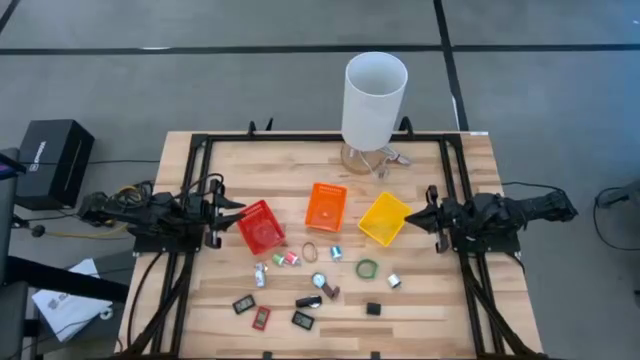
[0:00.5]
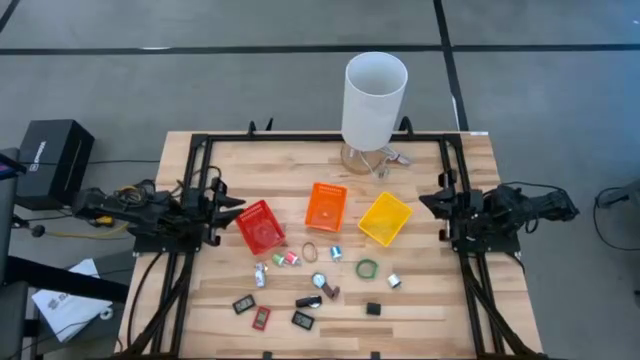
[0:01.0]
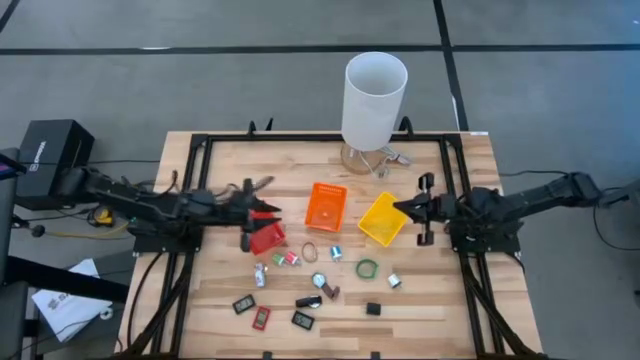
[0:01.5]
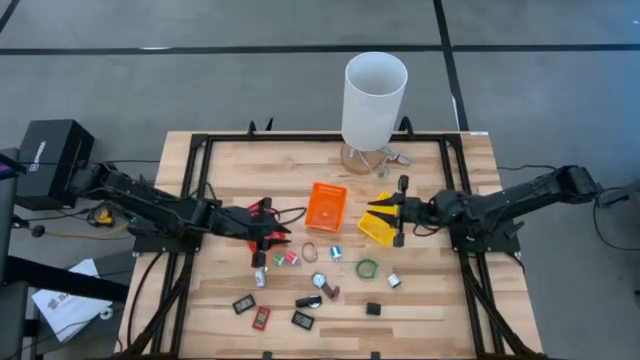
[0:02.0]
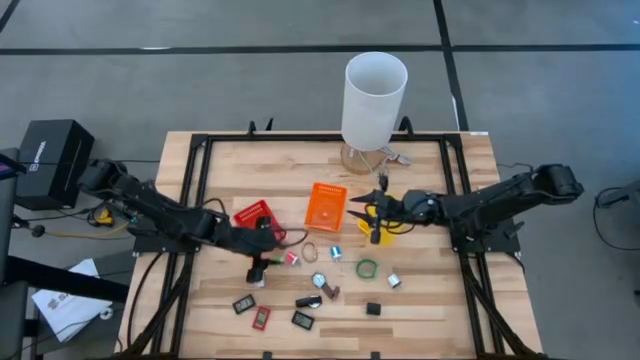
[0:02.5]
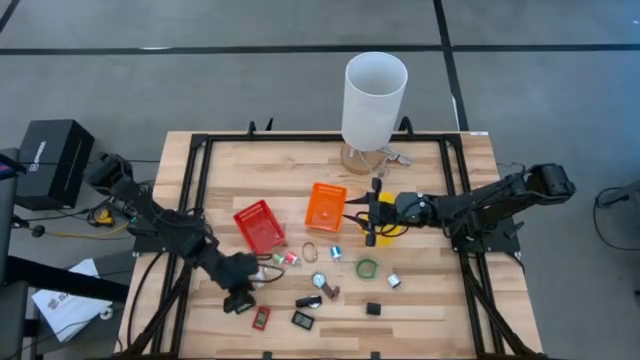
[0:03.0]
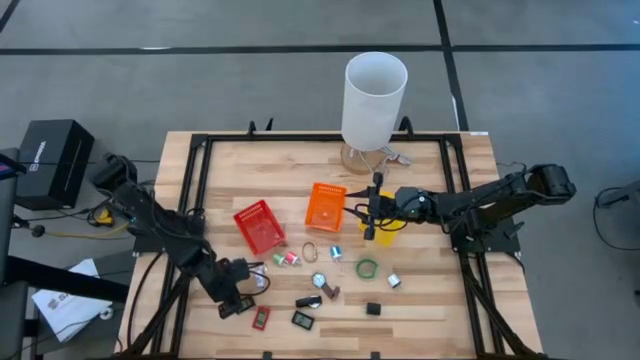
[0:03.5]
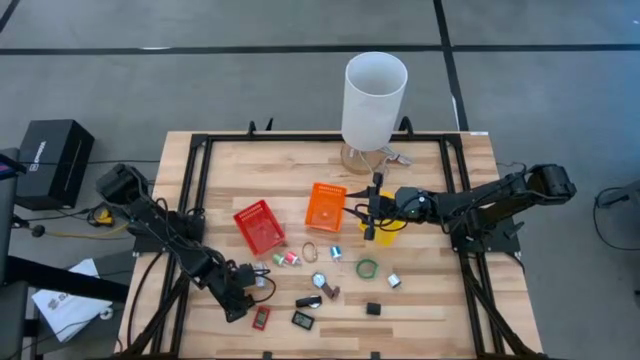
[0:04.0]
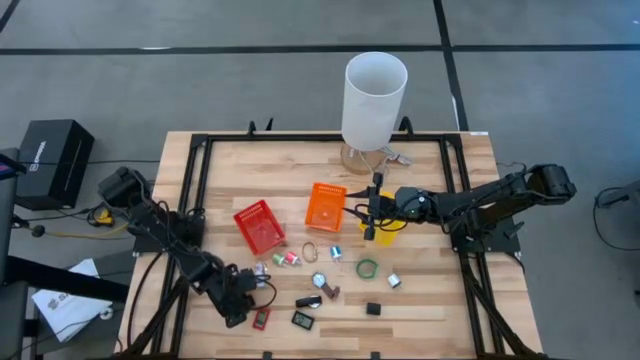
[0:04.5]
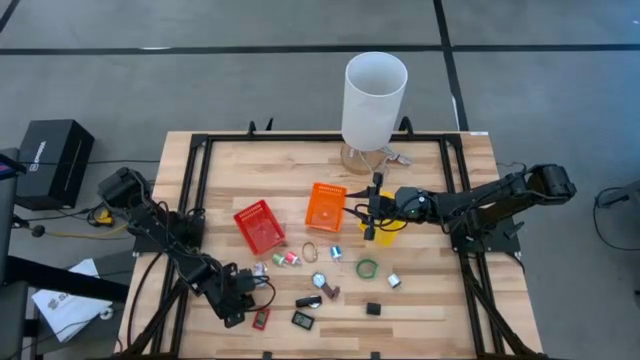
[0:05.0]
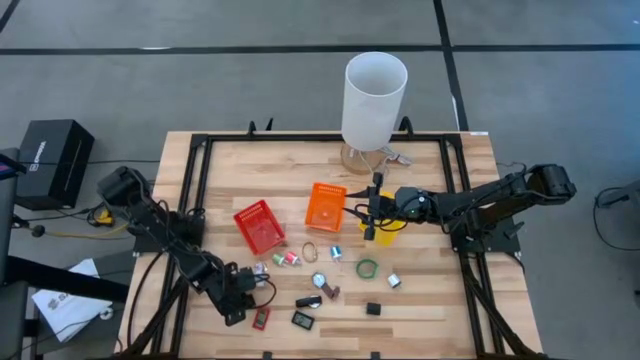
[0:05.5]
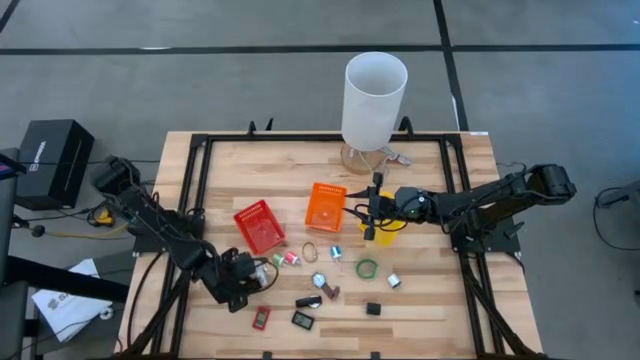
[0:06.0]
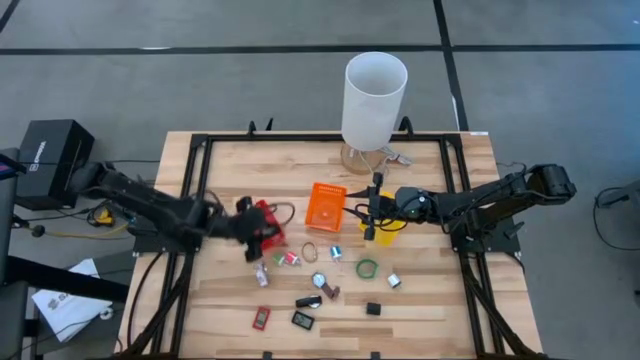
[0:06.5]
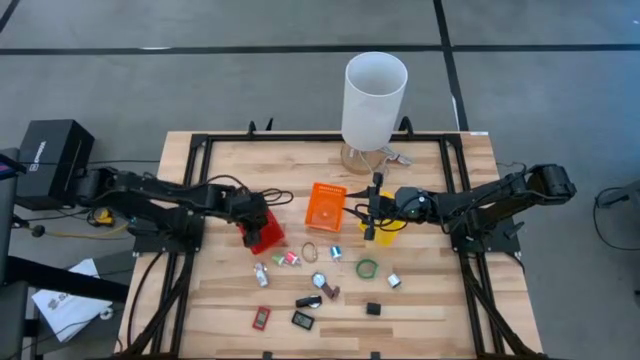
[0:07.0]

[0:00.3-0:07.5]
Task: Pick & Place Office items
Put the left black digital clock into the red bin

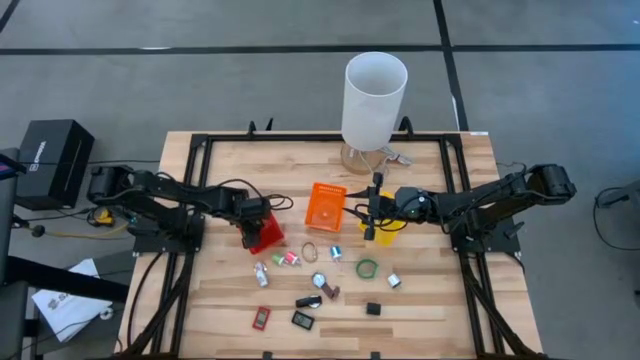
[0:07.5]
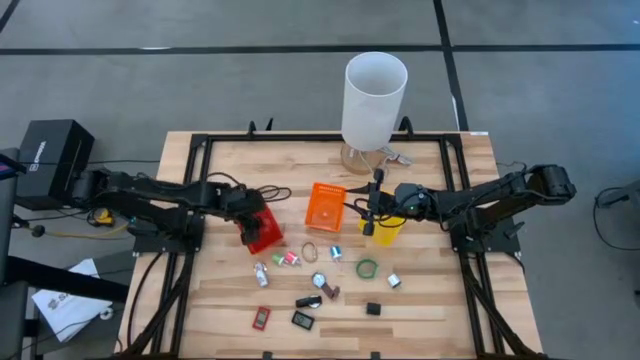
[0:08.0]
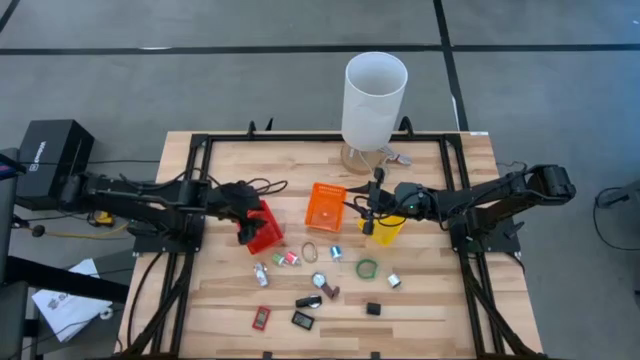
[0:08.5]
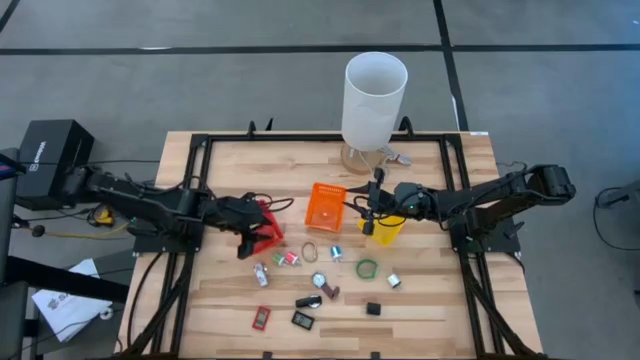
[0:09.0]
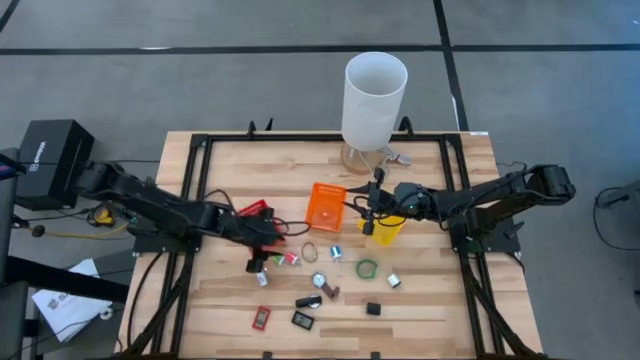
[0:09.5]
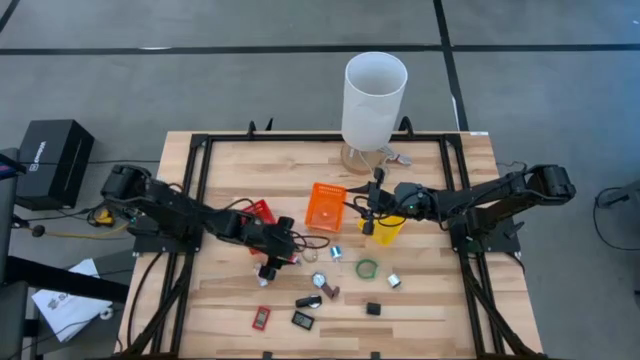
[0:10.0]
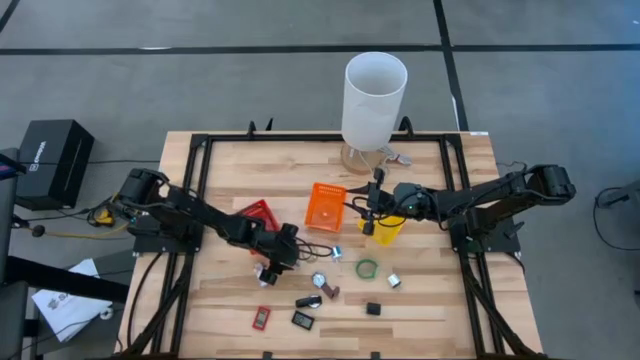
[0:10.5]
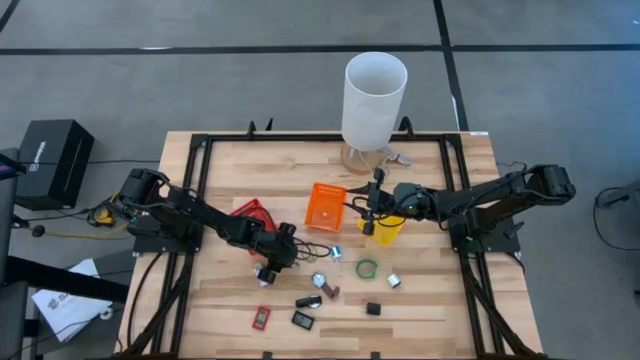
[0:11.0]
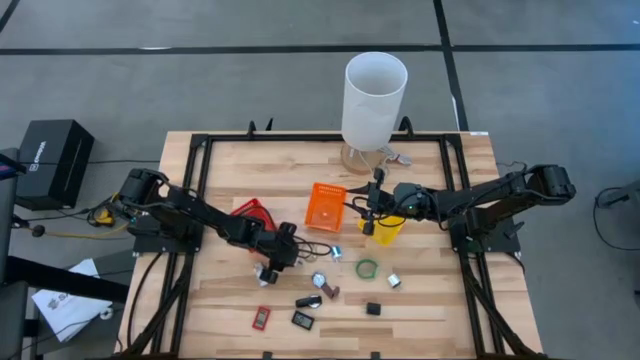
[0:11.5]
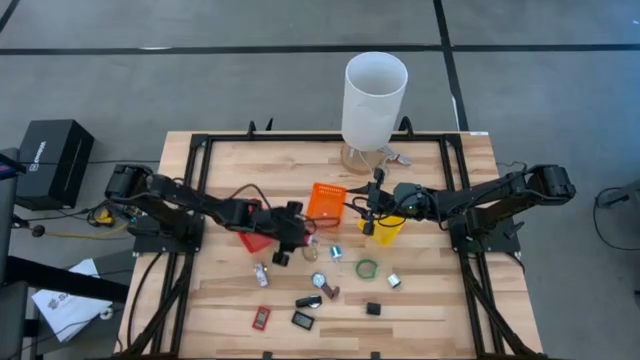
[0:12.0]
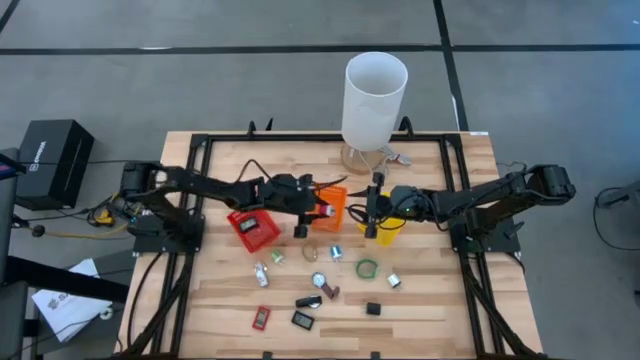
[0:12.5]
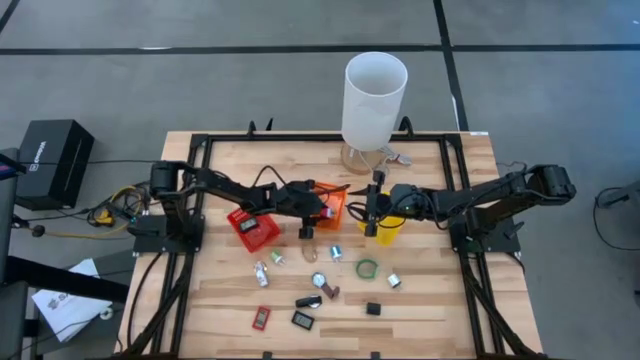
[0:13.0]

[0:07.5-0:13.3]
Put the pink charger adapter into the orange bin

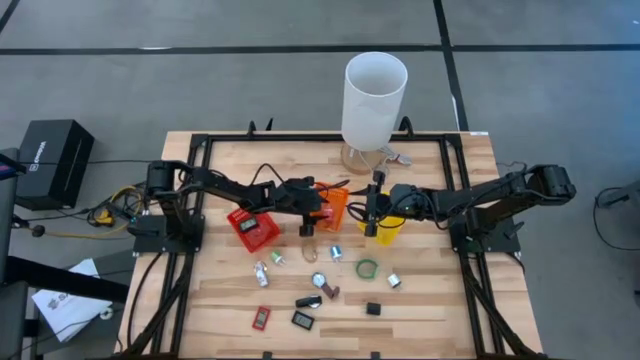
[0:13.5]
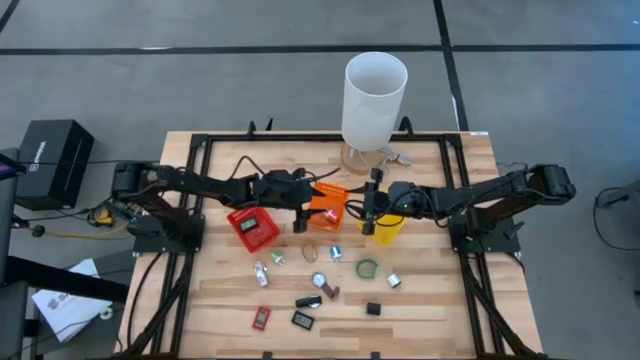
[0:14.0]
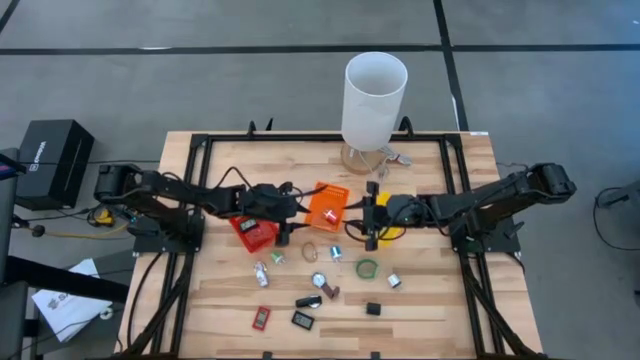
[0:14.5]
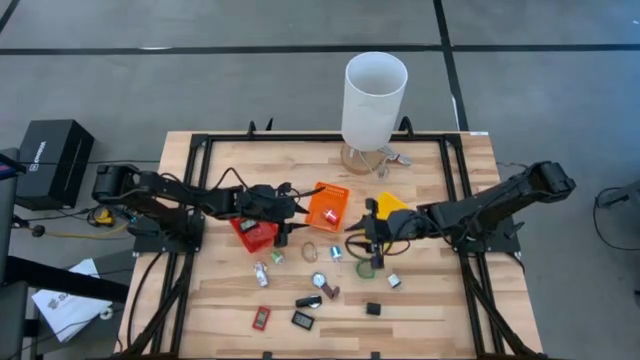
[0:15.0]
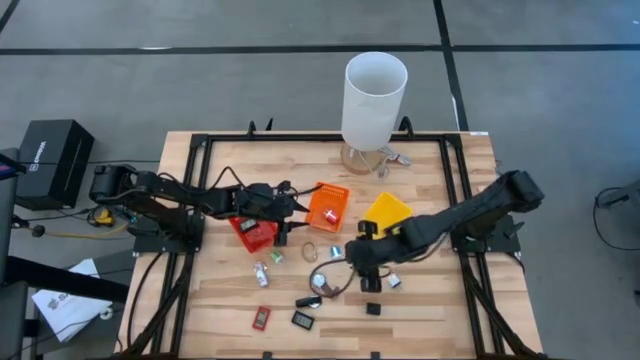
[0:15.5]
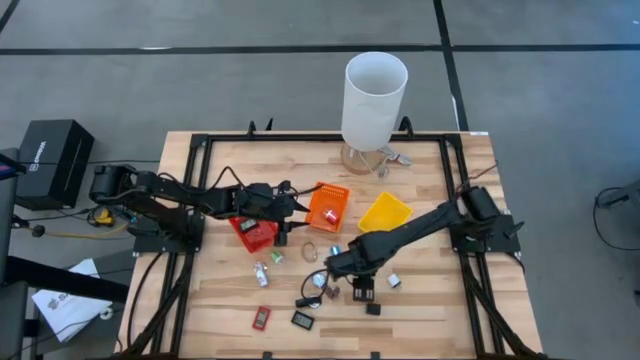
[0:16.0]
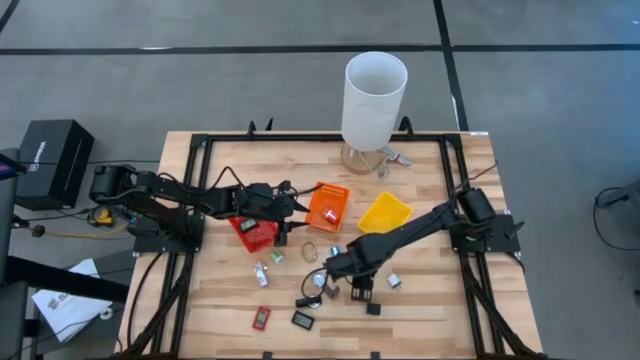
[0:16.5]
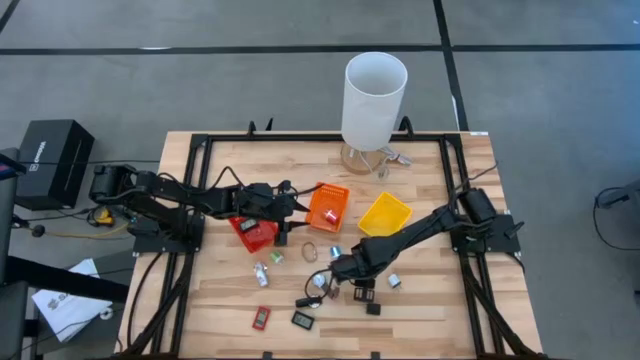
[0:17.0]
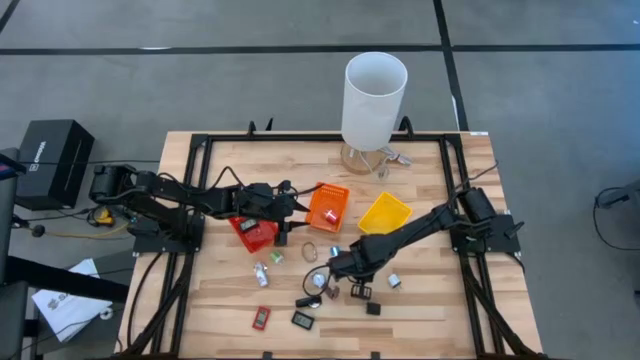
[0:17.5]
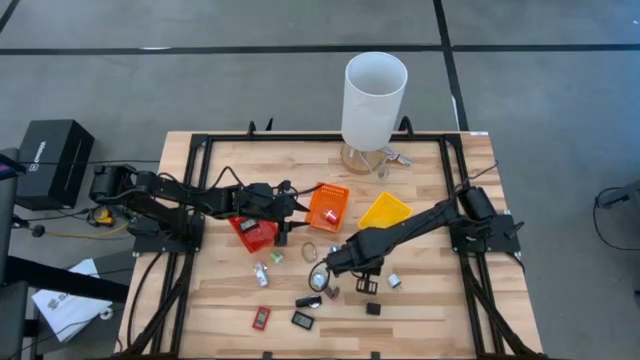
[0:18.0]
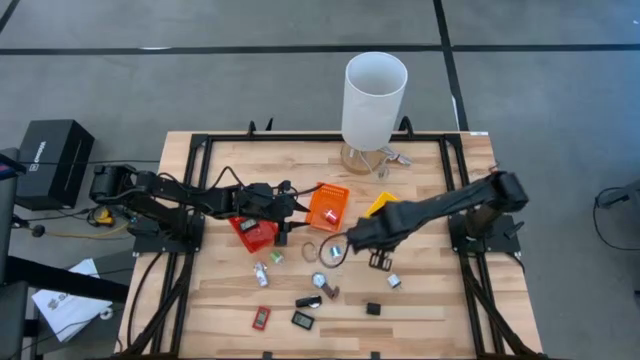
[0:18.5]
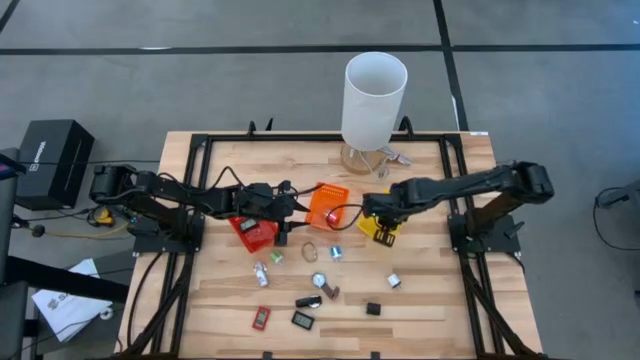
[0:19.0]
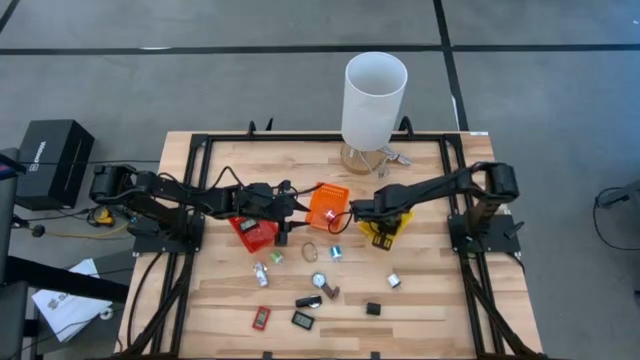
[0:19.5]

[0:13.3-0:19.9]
Put the green wrist watch into the yellow bin

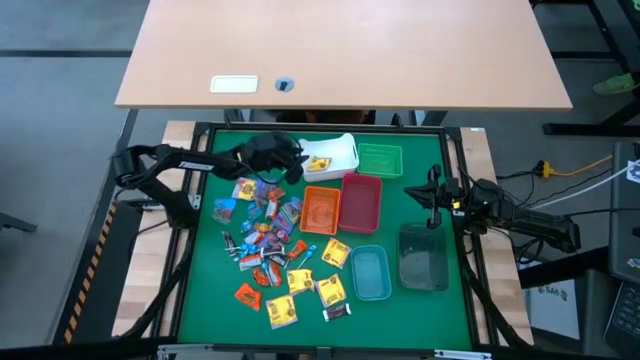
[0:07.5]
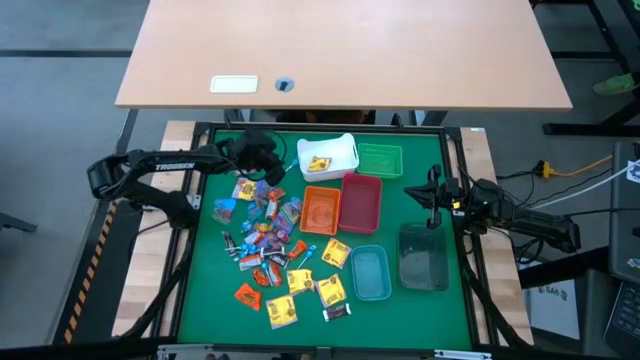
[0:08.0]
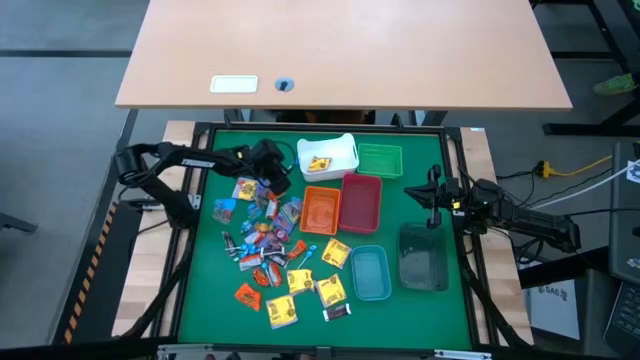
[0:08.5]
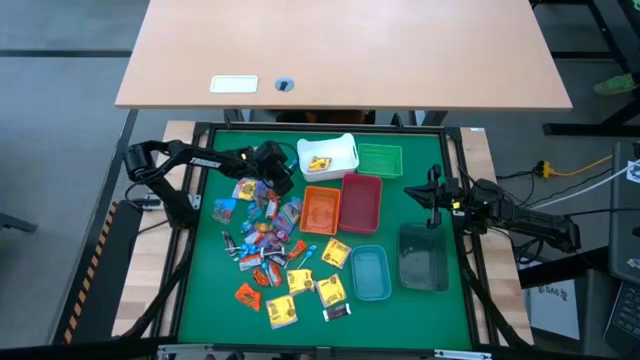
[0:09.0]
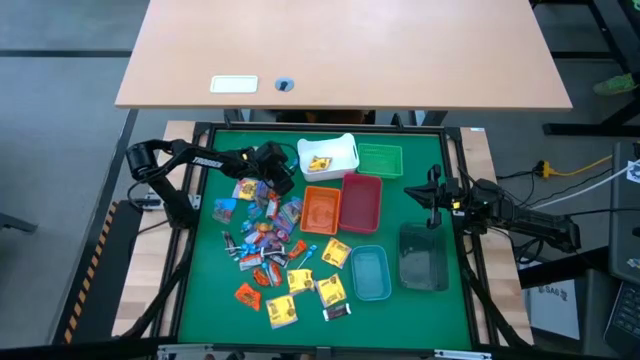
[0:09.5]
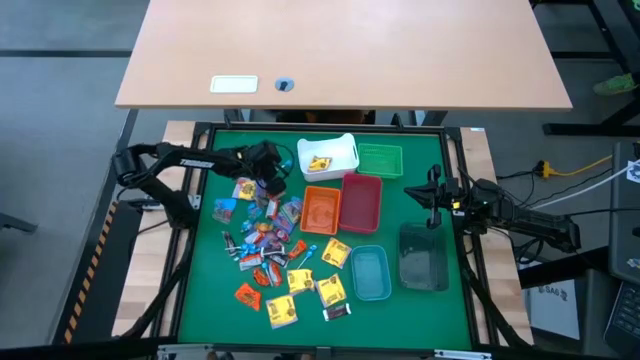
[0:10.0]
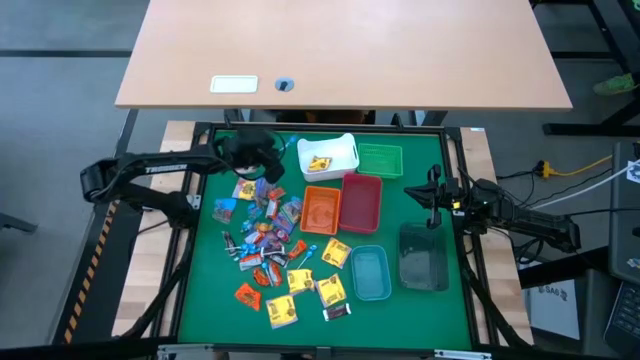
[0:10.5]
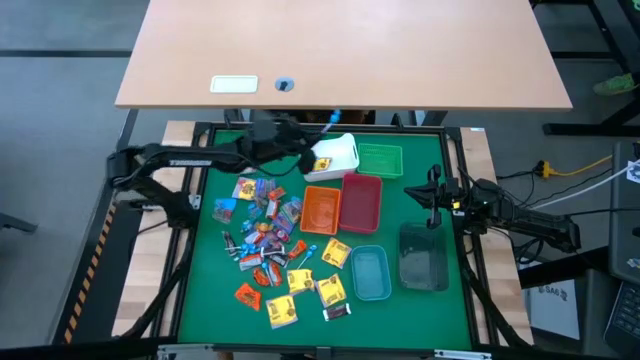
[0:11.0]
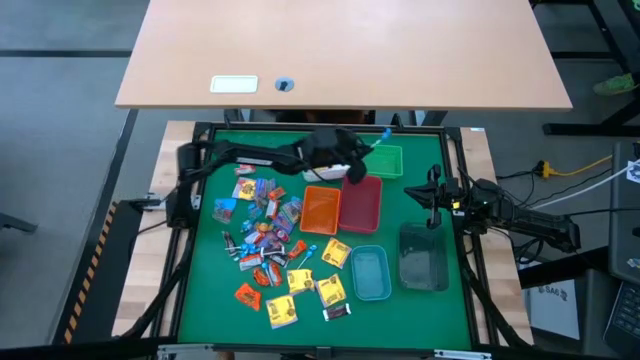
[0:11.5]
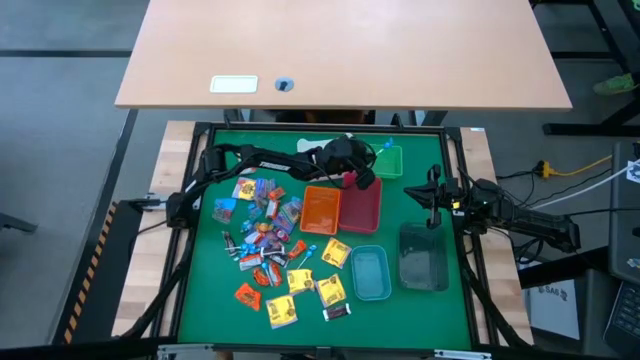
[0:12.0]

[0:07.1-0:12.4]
Task: Sort candy
Put the blue lollipop into the green basket
